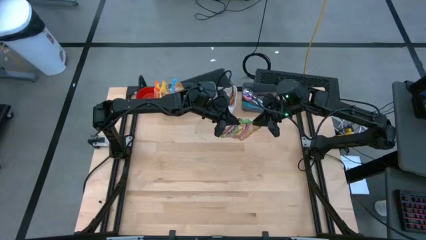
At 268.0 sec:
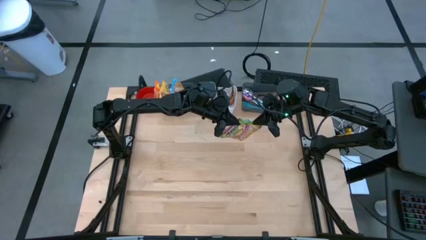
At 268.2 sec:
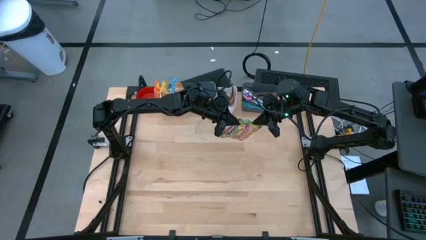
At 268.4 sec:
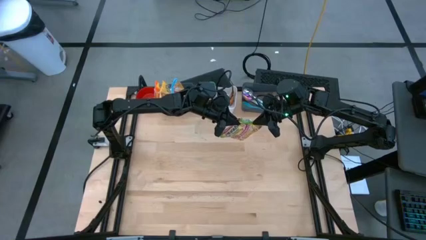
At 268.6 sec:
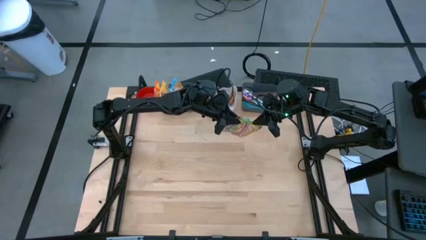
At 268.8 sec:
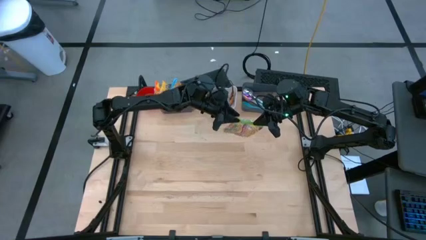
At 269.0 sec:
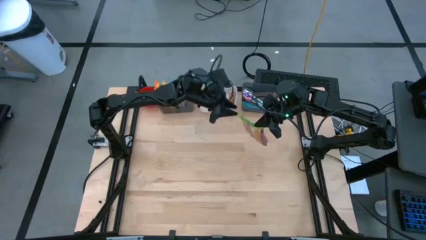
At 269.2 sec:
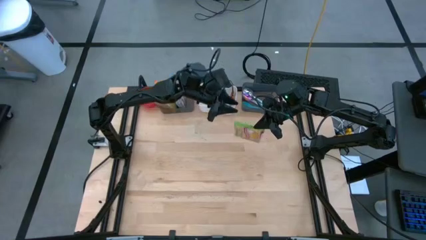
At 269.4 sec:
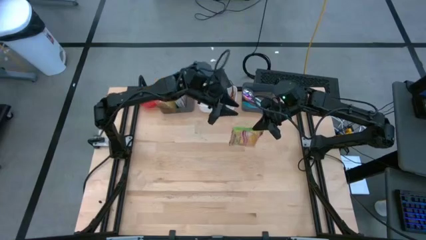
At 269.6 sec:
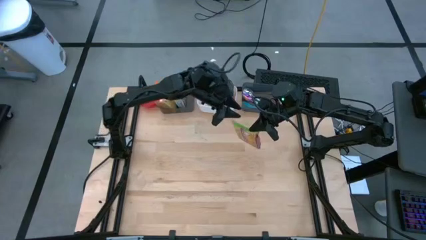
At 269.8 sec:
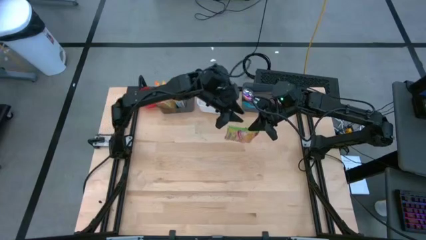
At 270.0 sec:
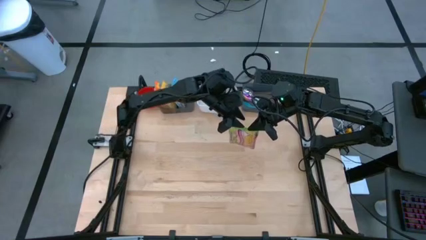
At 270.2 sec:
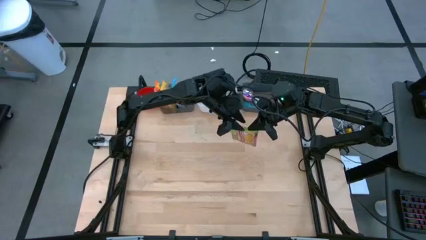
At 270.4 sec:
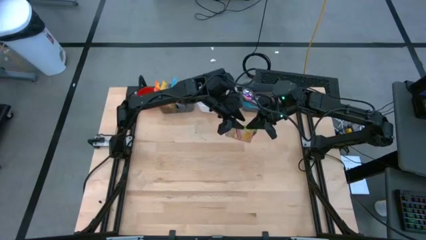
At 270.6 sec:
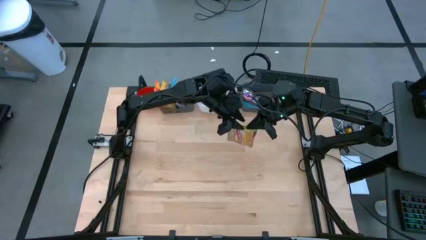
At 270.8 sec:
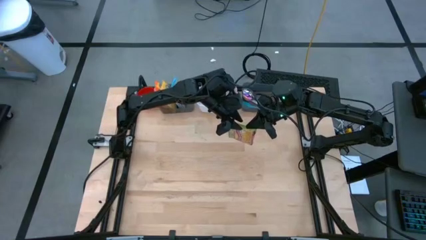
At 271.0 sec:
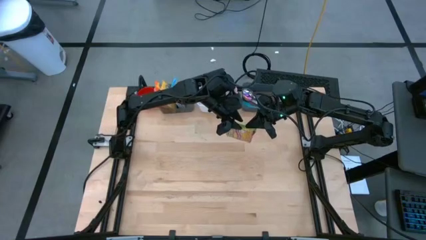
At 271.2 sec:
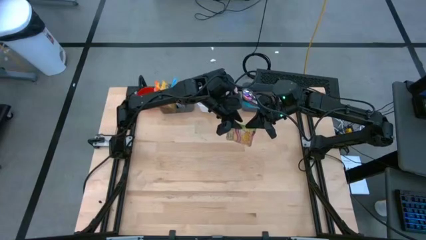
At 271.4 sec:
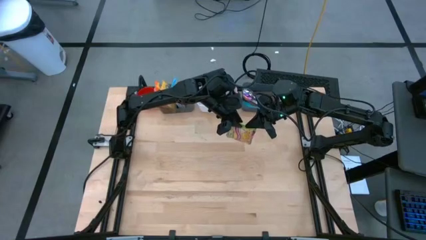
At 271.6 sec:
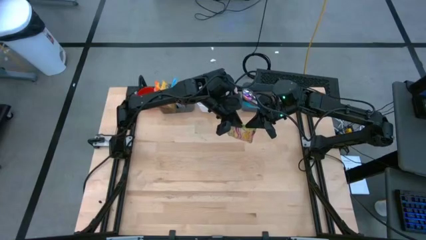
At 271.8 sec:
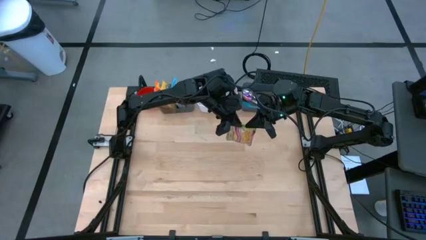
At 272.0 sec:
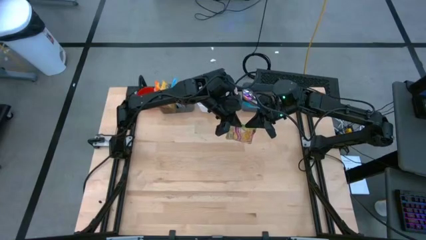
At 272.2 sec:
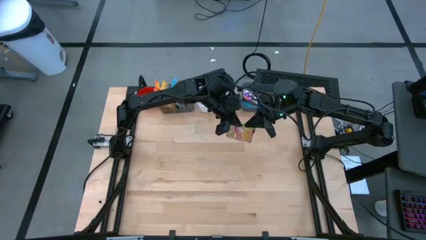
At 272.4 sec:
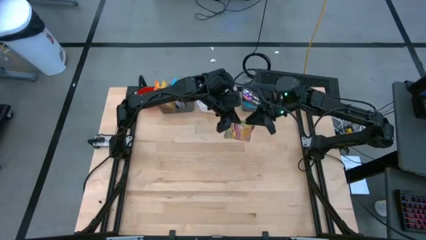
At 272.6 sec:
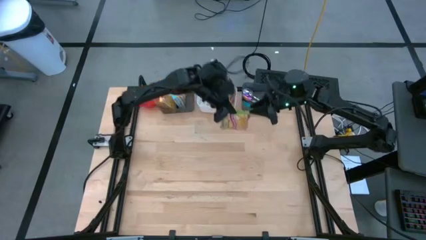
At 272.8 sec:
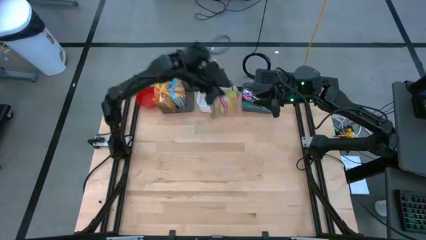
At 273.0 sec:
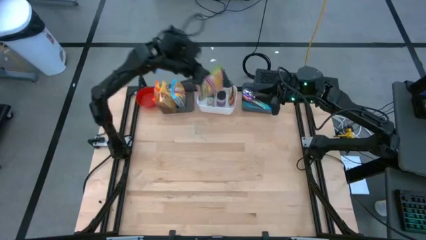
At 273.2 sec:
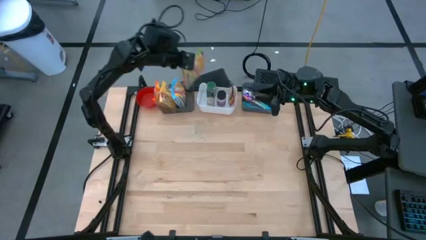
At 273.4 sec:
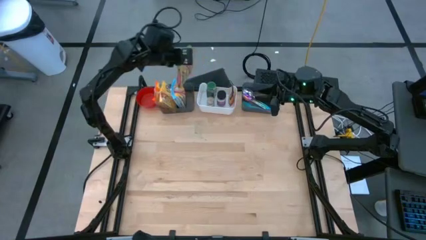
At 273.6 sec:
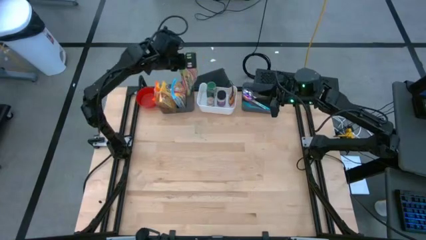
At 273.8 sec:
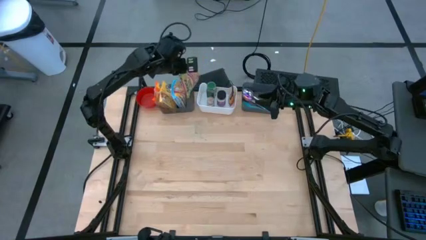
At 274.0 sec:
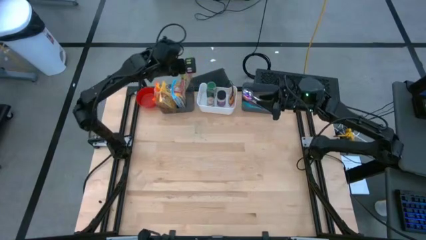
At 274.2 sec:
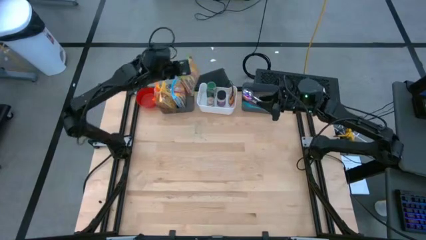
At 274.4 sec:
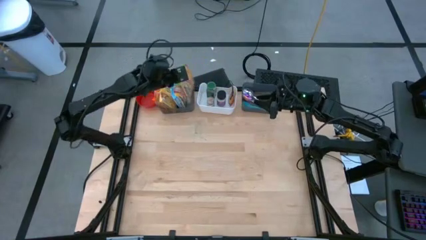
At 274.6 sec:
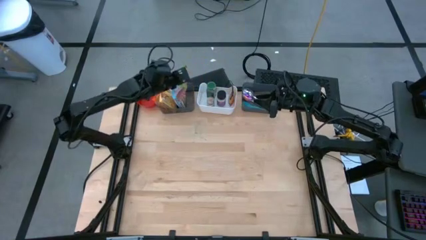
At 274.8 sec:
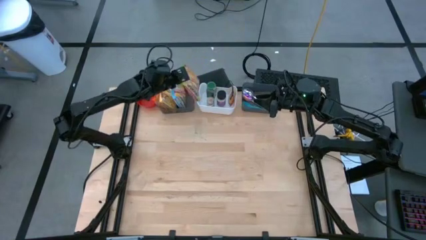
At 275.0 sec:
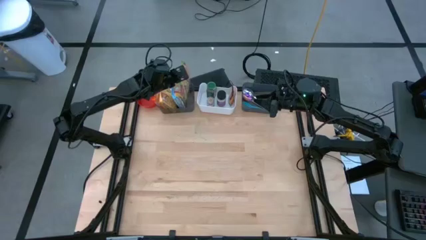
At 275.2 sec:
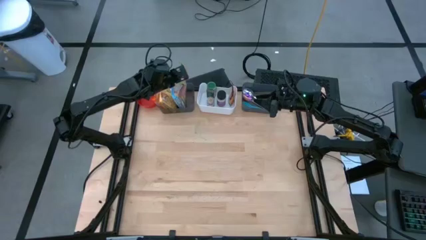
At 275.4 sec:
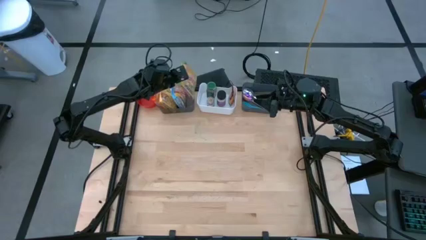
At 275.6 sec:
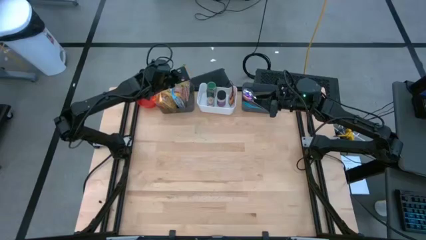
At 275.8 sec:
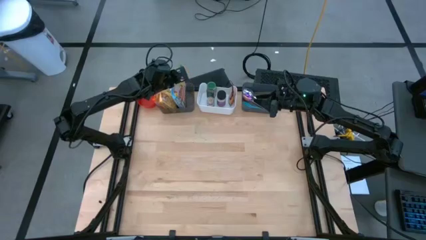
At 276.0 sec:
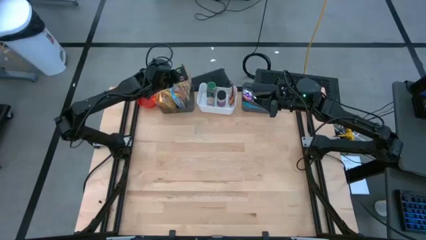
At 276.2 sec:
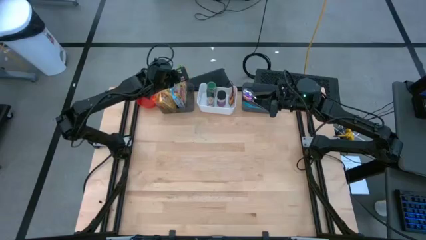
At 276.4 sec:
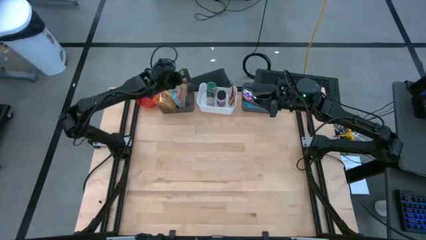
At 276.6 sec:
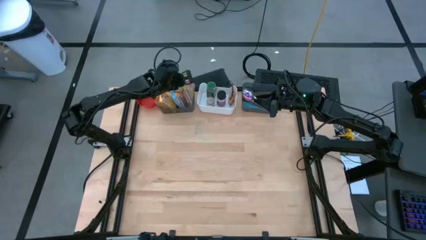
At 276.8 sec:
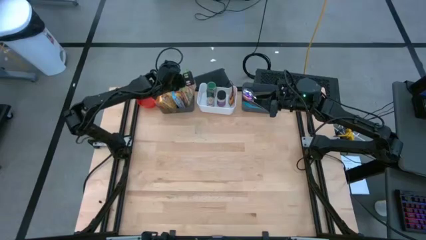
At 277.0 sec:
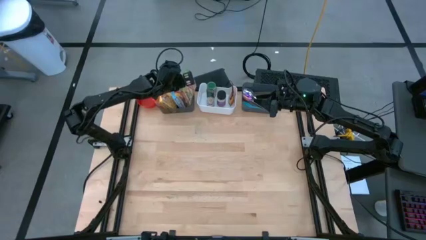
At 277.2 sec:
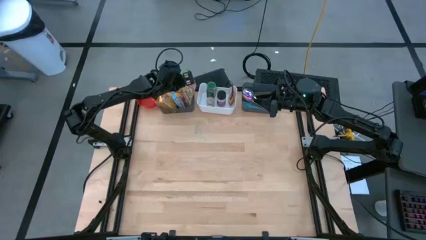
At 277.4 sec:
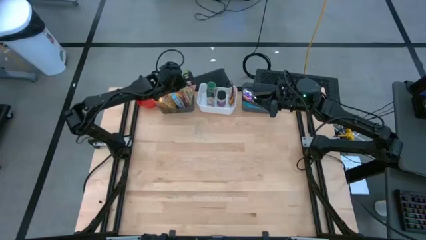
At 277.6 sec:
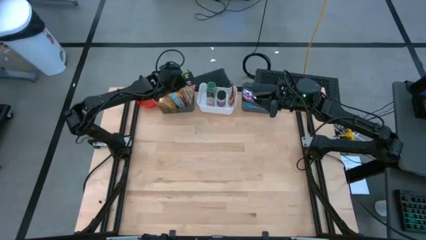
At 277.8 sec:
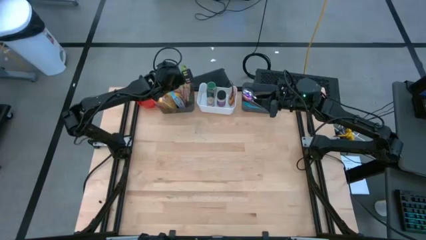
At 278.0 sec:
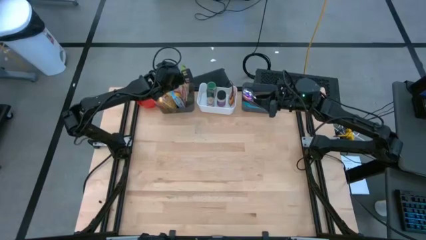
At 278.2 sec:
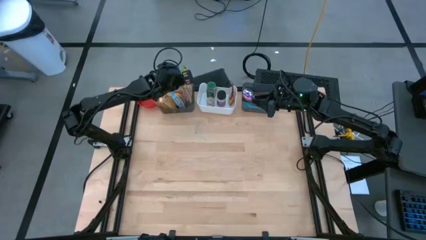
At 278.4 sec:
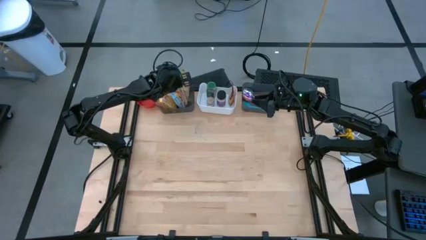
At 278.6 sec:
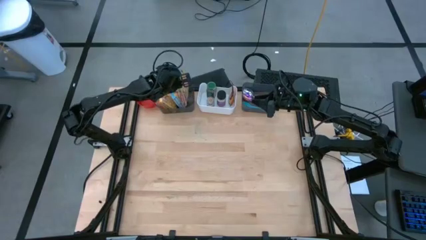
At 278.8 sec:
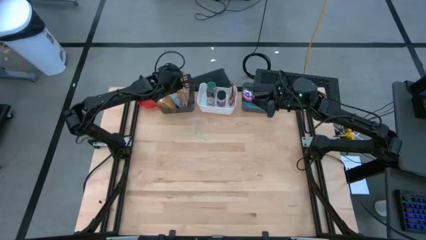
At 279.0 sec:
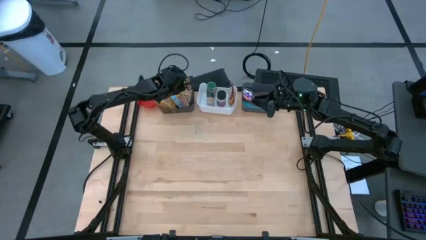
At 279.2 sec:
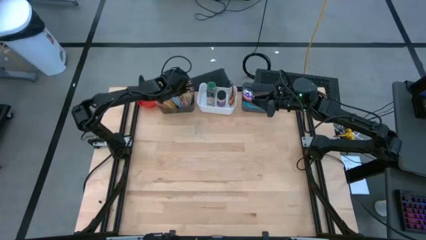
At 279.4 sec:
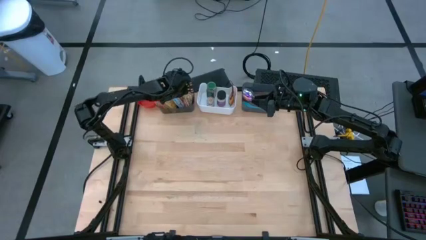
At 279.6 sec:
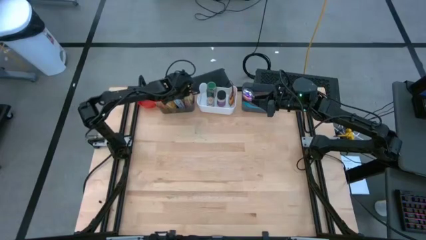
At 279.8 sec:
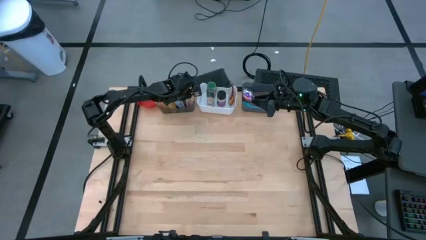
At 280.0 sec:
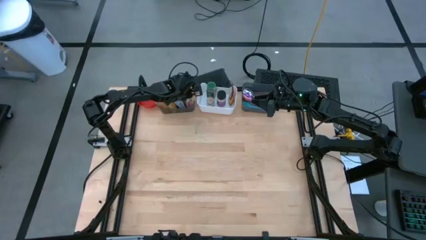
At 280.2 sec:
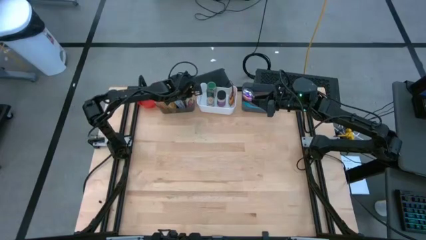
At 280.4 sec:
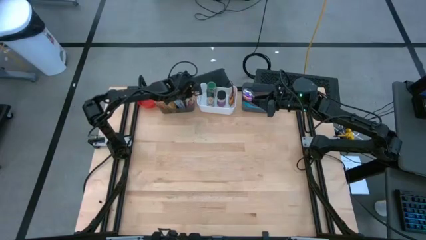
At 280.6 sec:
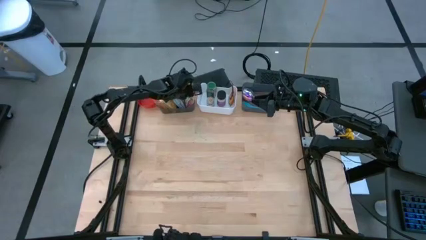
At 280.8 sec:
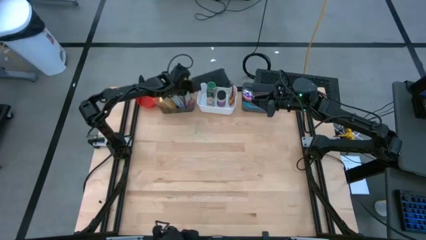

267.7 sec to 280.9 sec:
Task: Pick & Place Food Item
Put the green noodle pack into the left black bin
